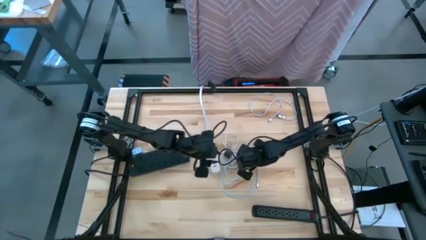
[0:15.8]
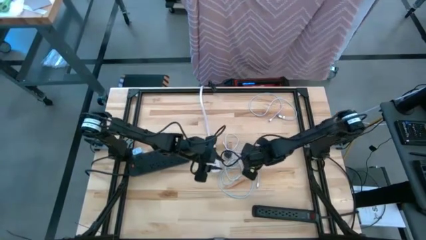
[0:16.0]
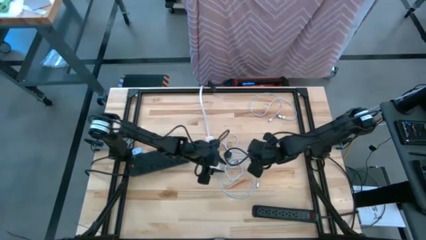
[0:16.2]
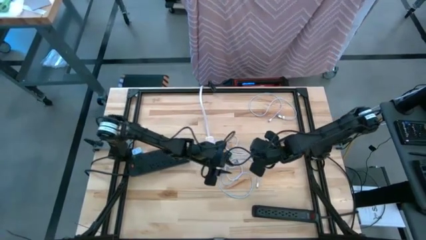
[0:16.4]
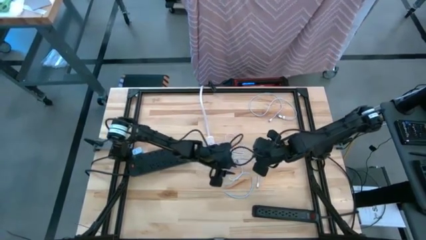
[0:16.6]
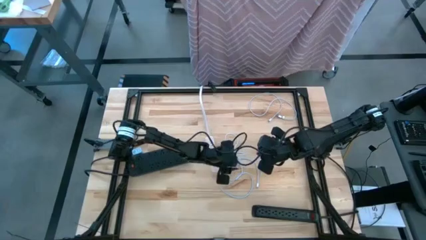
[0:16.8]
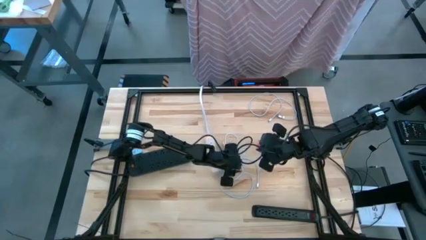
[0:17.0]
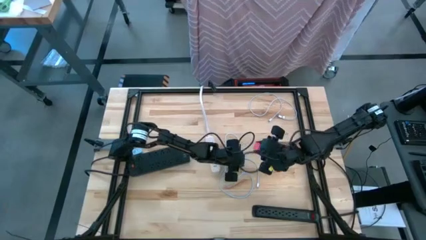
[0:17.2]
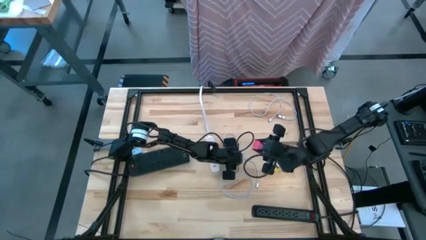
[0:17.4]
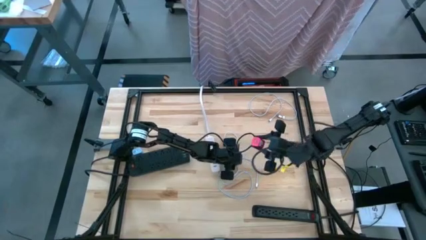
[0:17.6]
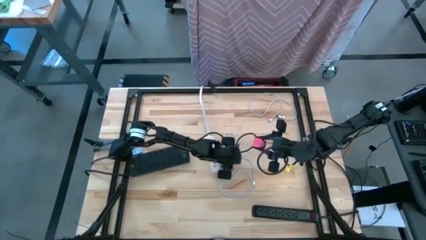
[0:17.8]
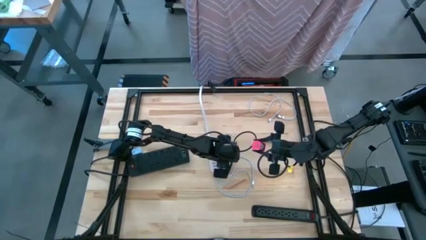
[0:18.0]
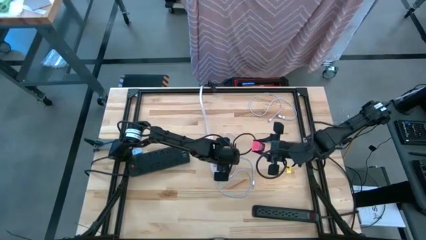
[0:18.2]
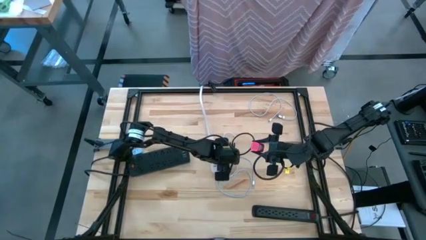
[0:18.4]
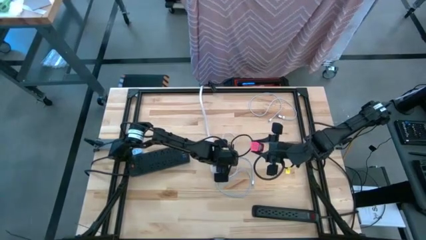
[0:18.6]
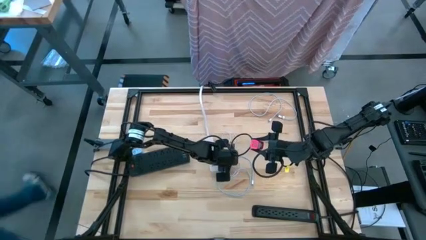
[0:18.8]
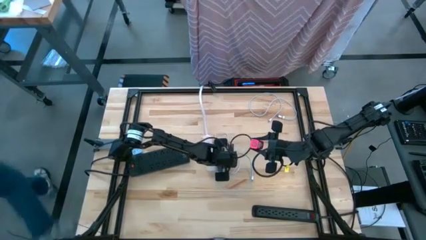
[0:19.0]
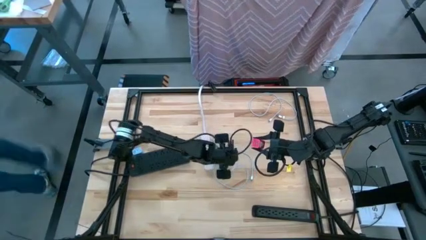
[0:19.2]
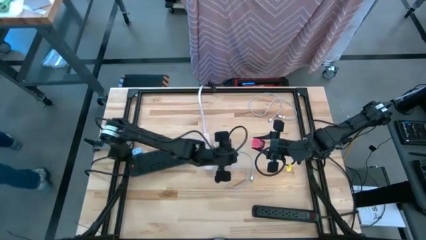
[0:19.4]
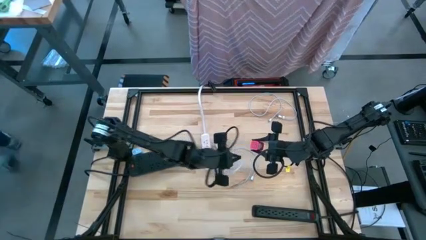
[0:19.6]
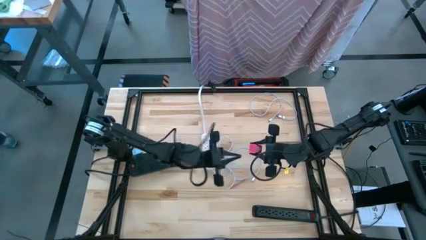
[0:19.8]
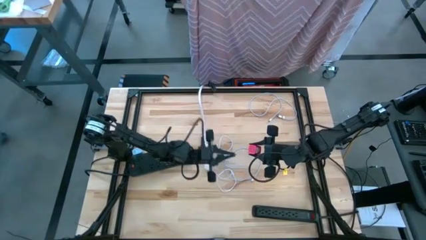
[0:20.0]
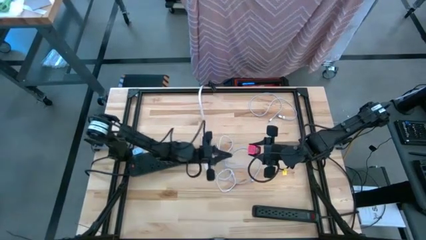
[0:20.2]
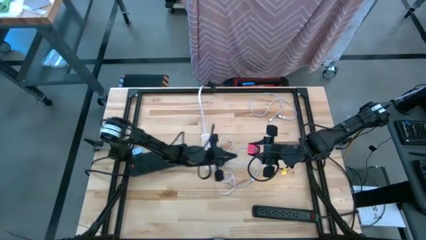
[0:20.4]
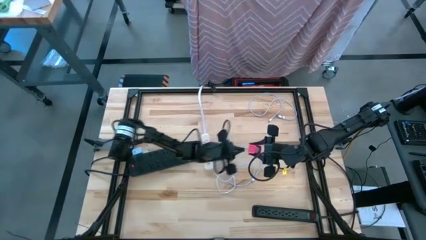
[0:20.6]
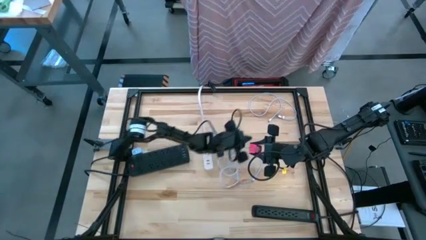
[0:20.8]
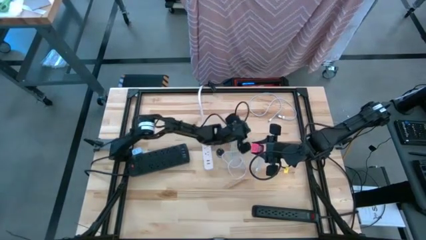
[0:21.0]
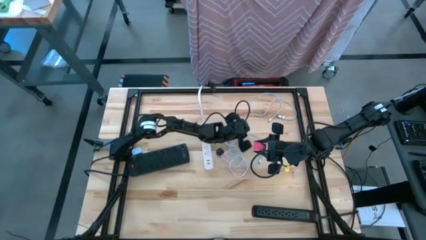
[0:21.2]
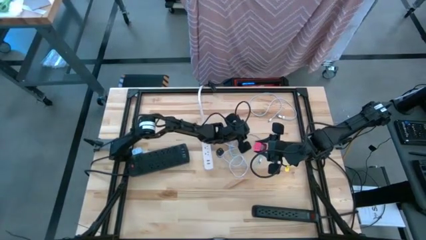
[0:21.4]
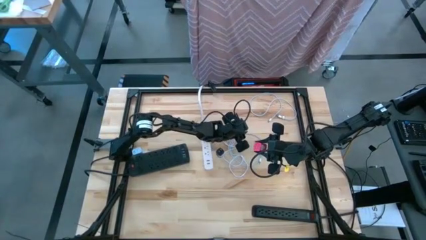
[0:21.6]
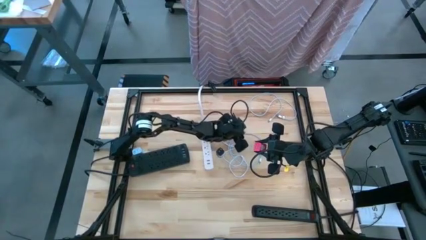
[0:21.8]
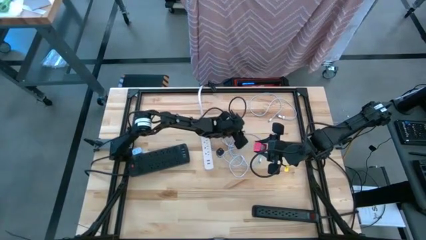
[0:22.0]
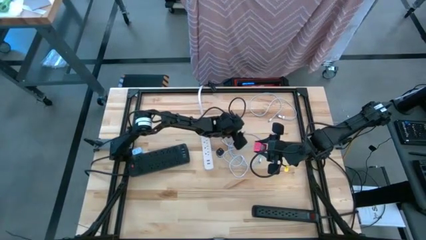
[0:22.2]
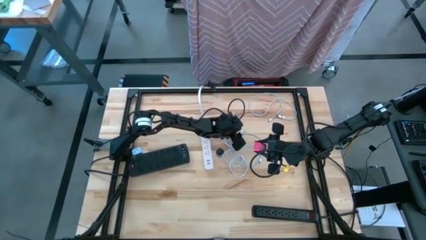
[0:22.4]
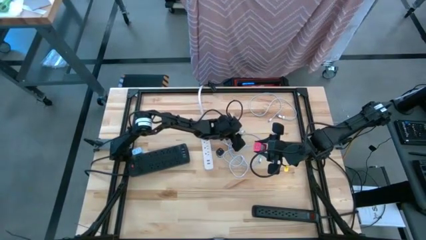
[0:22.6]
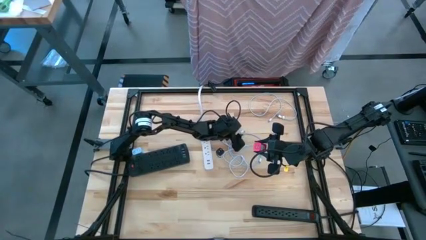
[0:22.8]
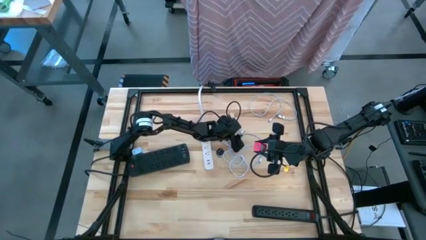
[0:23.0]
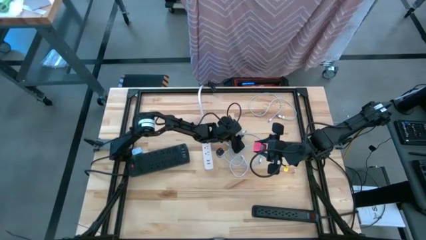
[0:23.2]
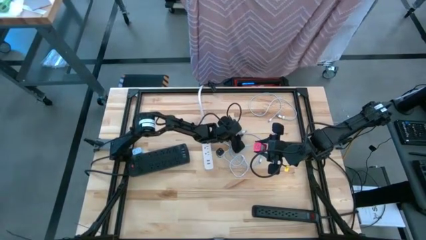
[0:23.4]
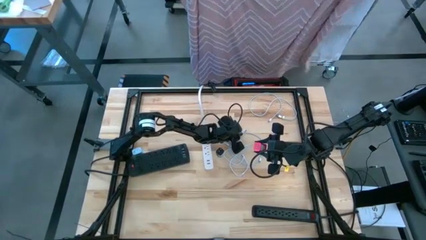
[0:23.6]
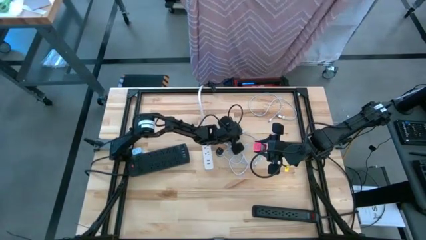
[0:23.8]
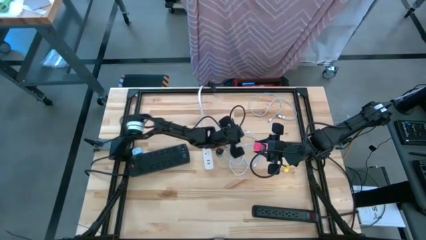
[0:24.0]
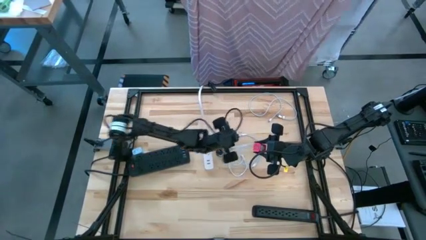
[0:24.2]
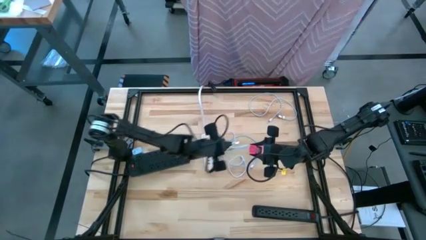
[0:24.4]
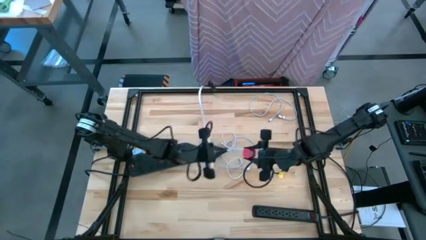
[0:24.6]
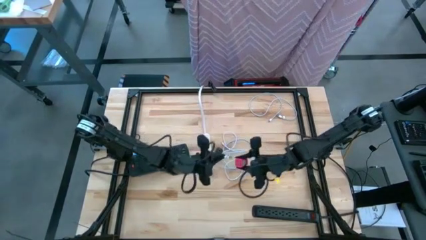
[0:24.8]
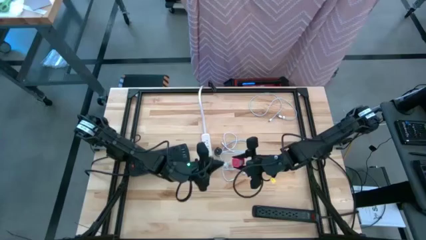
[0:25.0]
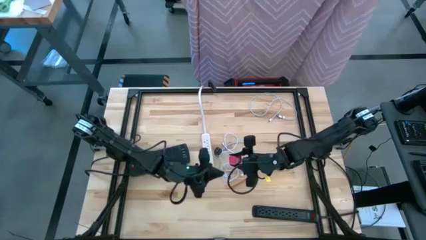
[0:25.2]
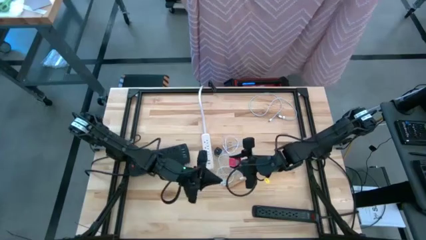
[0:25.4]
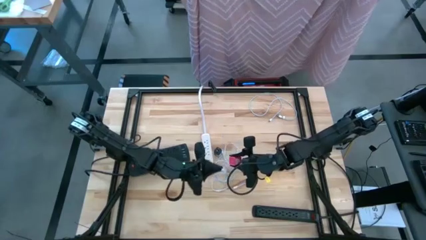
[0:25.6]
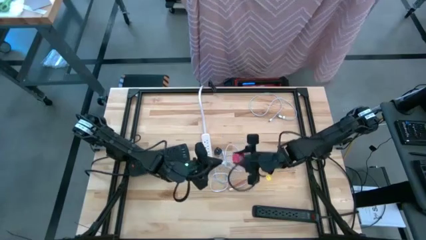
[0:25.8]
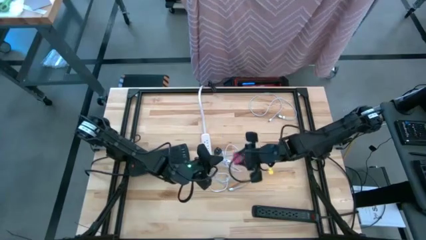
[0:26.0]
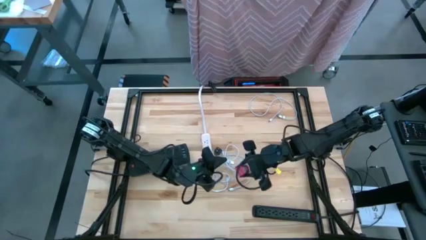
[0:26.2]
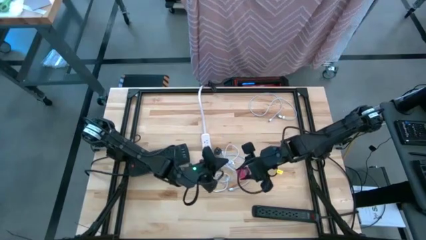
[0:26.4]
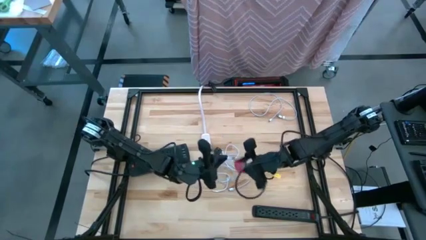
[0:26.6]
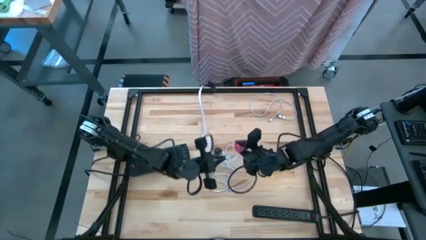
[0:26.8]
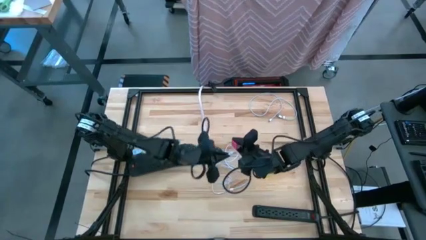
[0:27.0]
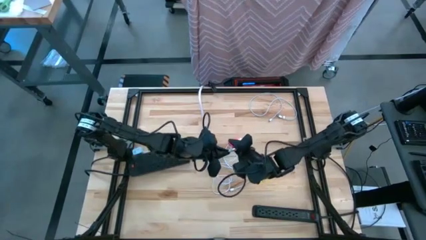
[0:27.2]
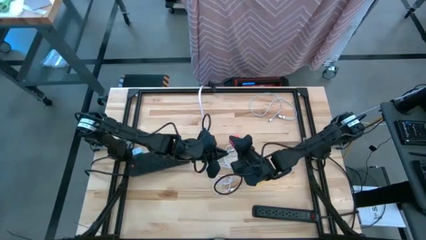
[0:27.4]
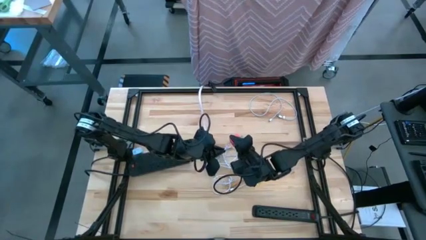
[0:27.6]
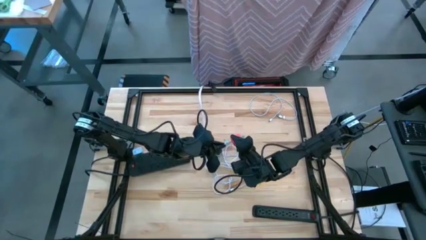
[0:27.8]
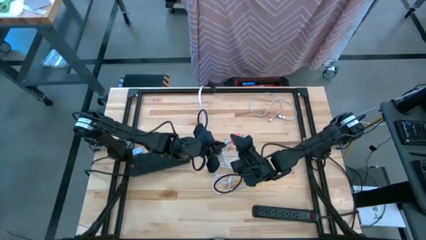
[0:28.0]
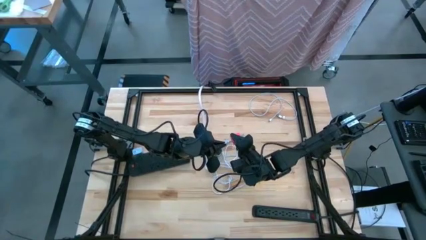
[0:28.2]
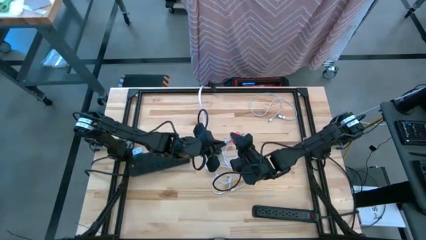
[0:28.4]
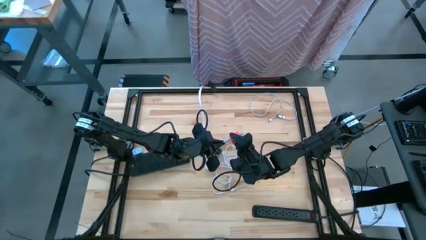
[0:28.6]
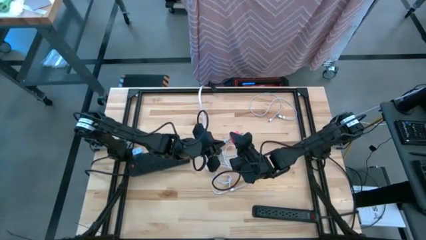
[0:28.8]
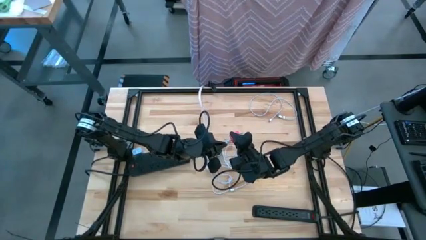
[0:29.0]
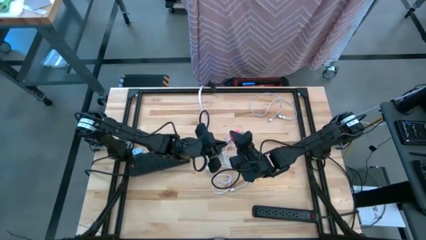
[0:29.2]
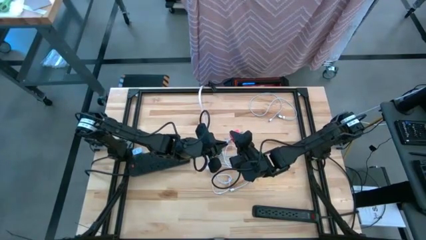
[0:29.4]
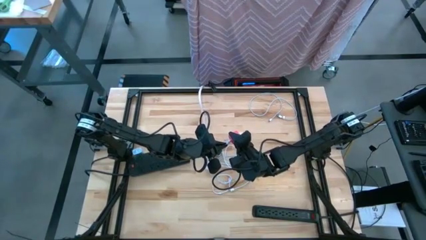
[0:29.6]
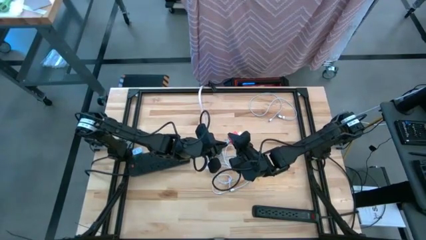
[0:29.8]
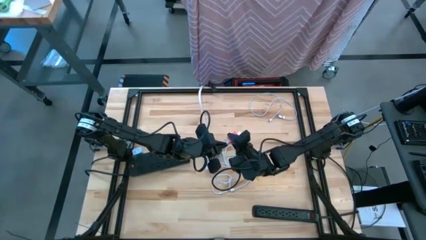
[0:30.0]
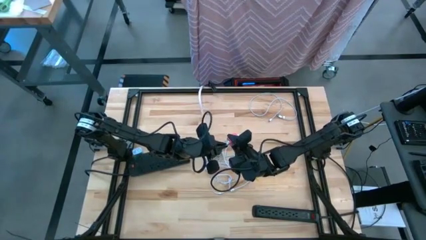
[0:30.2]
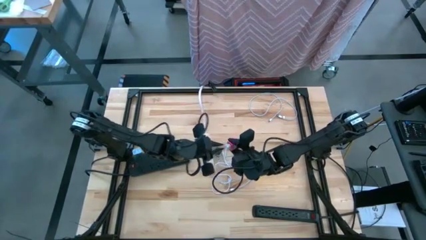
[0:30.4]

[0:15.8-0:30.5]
Task: Insert USB
Insert the white charger cable to the pink charger adapter
